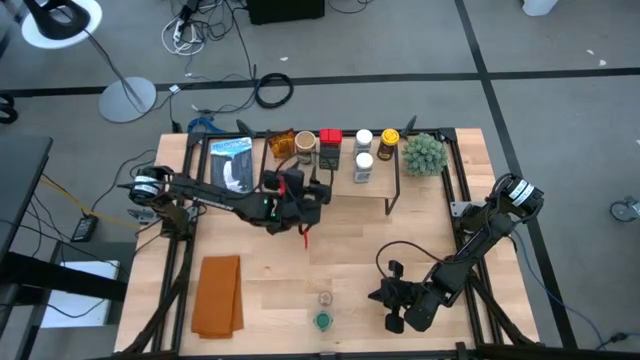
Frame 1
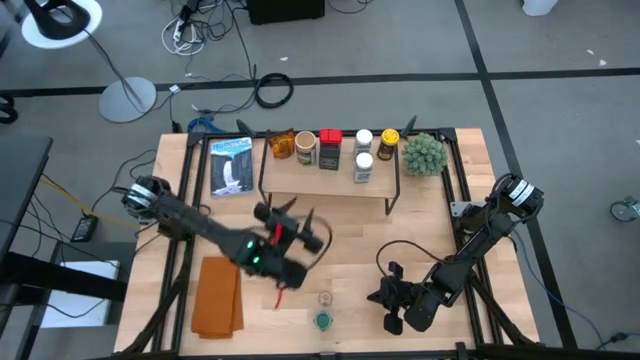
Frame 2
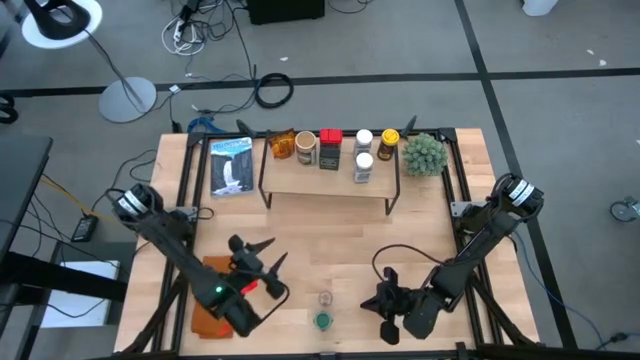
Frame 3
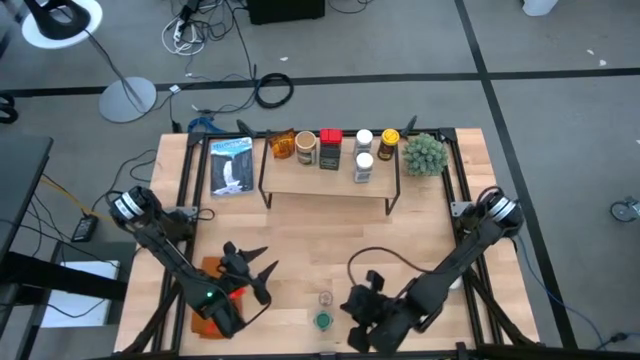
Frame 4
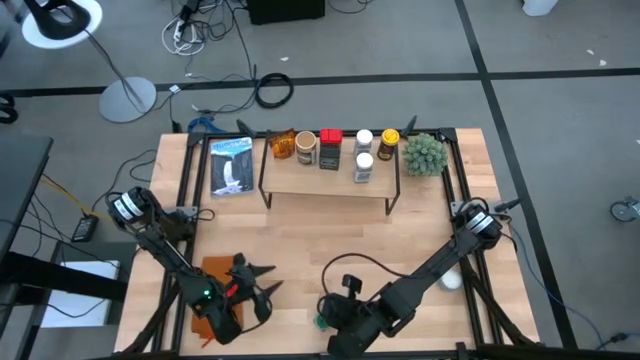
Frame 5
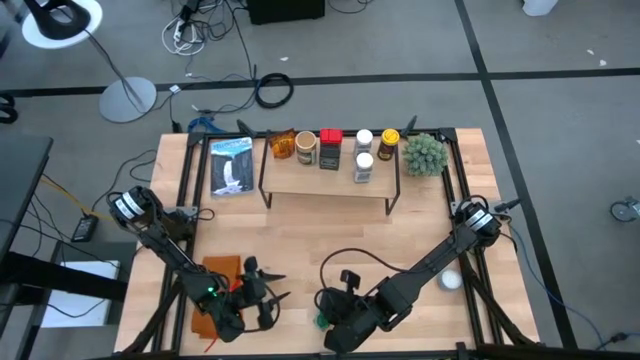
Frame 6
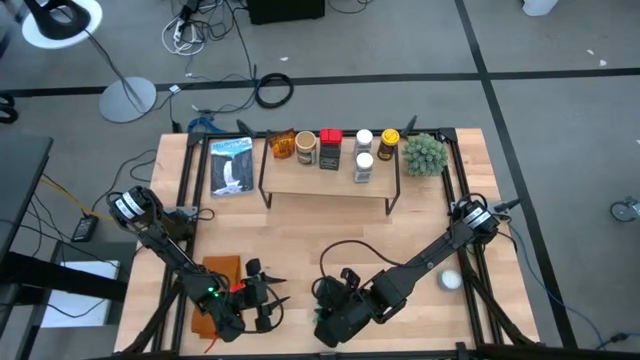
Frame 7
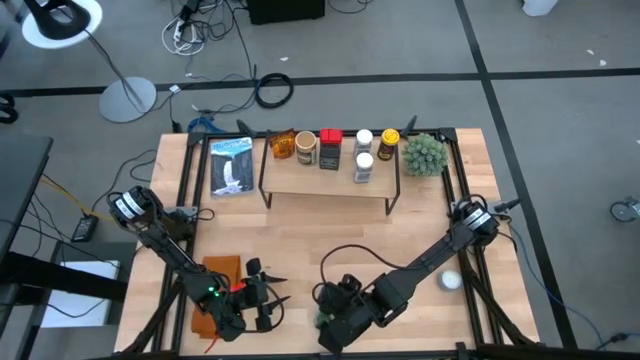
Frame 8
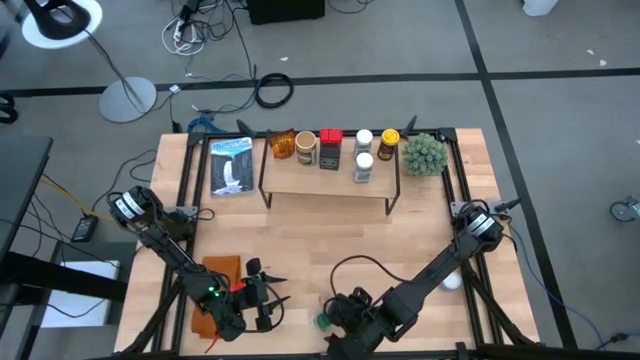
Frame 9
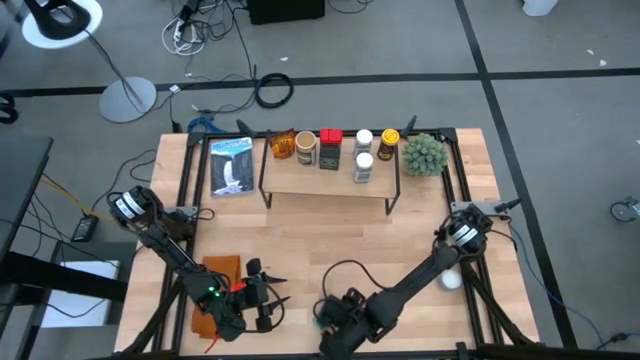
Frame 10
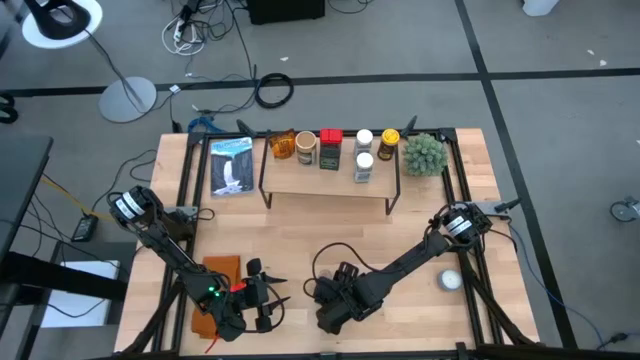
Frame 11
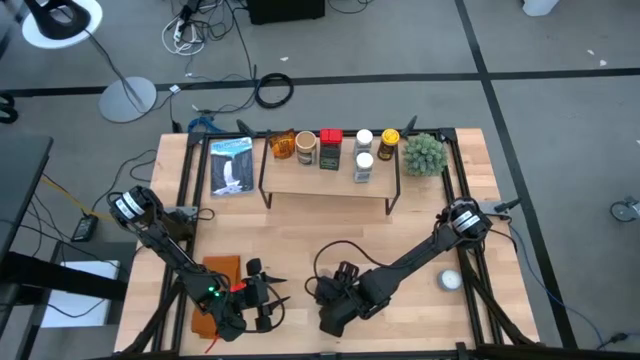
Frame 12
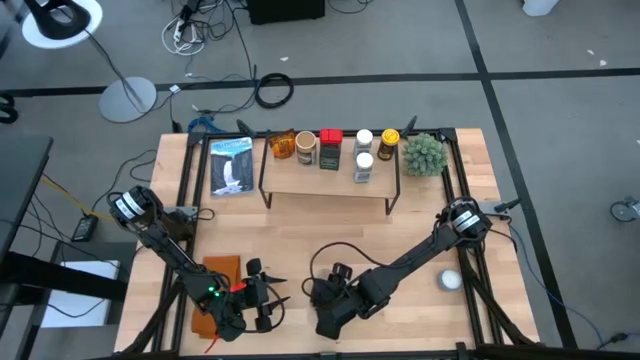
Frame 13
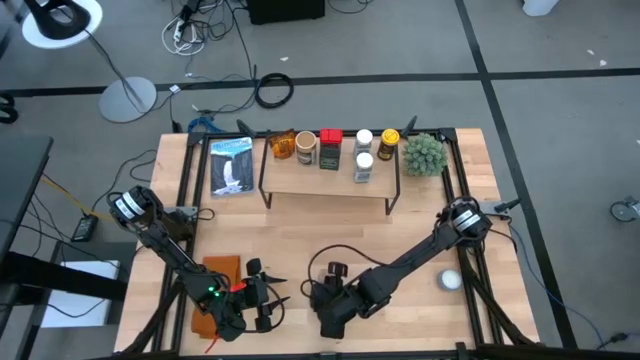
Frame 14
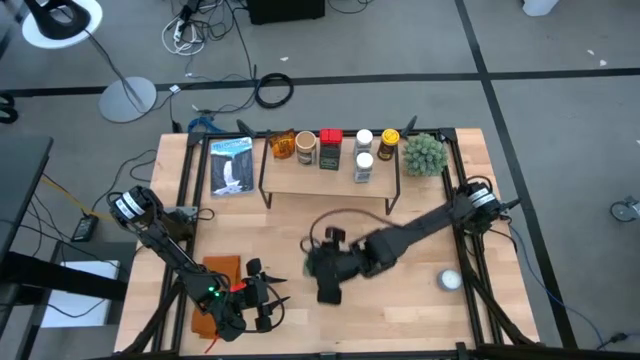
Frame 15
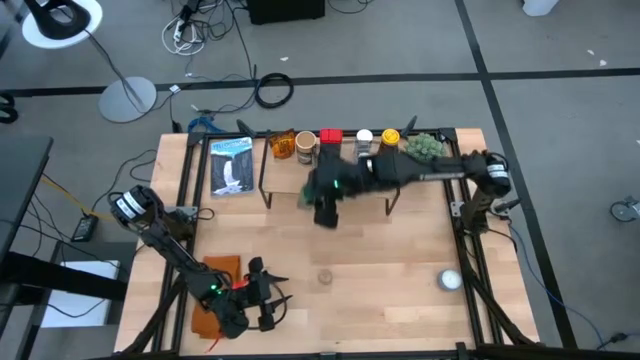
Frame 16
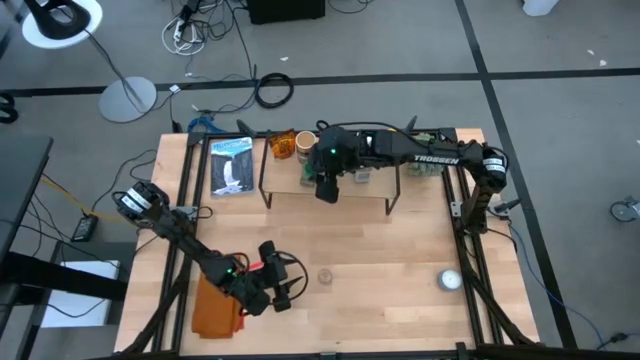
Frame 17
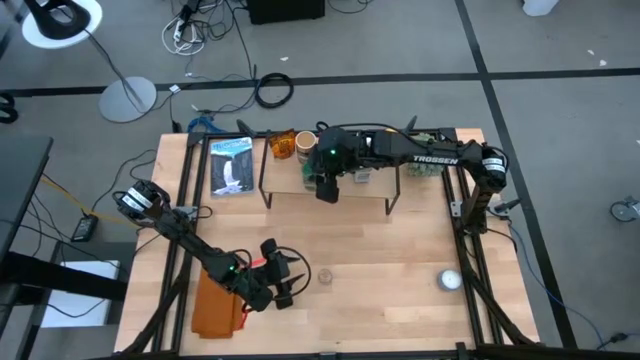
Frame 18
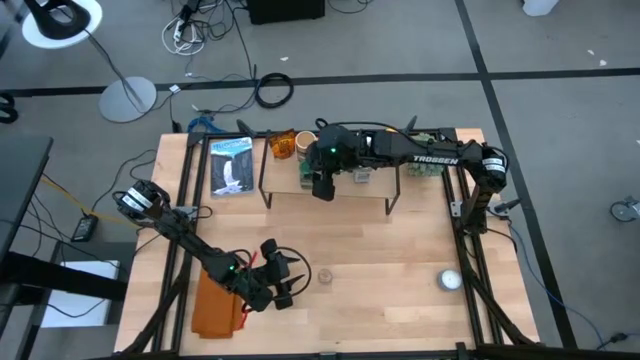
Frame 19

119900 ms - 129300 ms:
Task: Shelf spices
Put the green seasoning bottle on the shelf

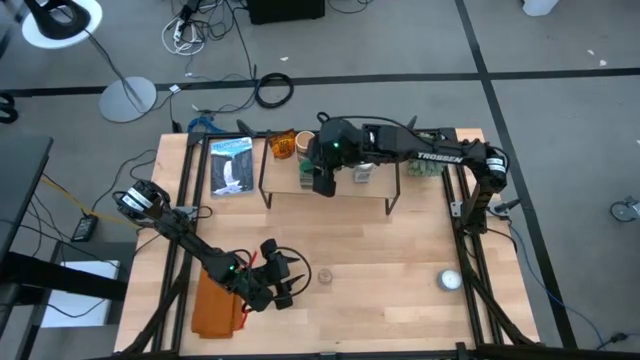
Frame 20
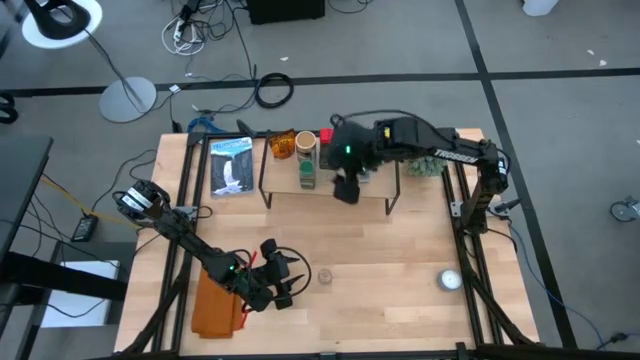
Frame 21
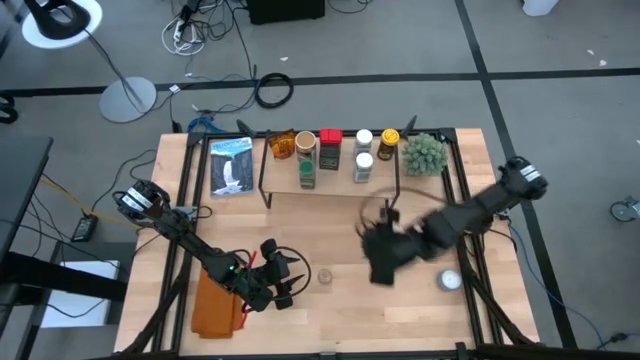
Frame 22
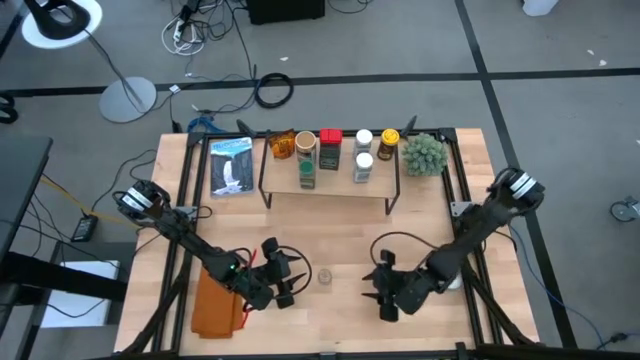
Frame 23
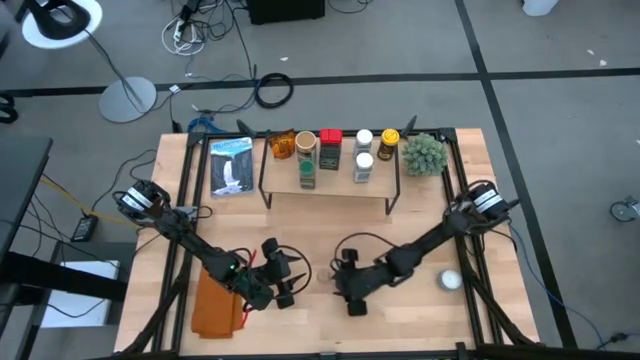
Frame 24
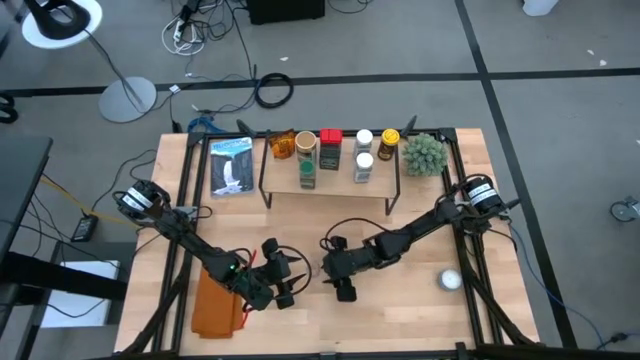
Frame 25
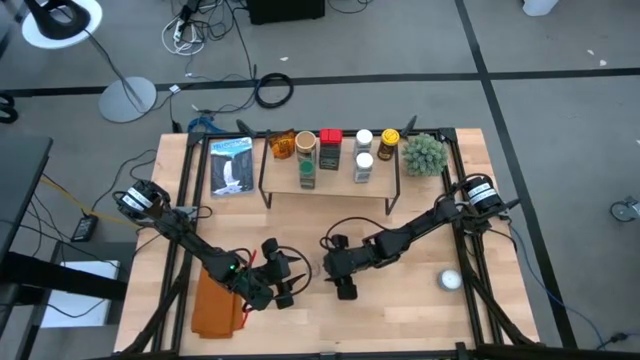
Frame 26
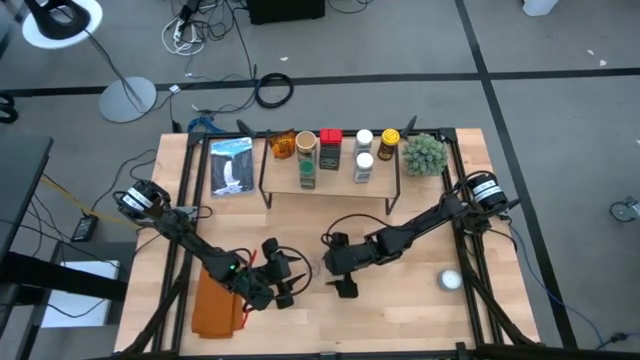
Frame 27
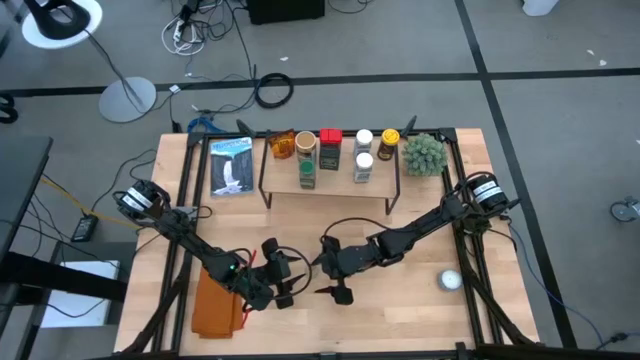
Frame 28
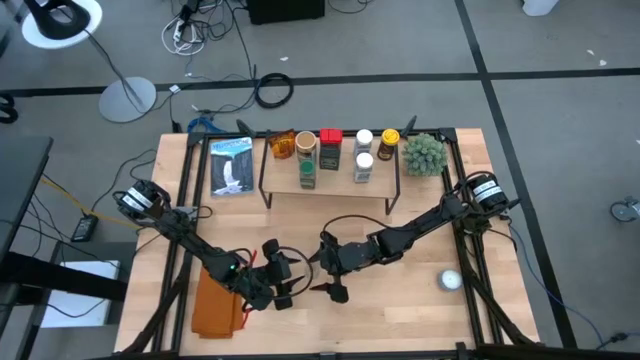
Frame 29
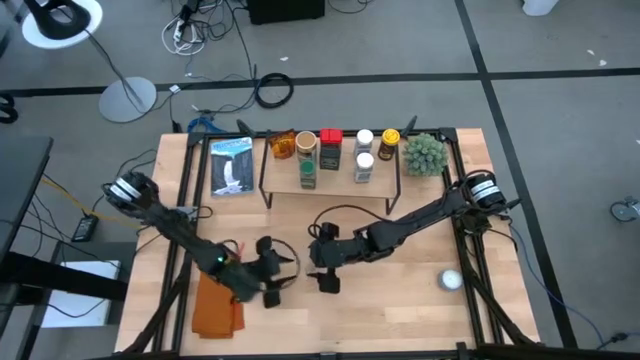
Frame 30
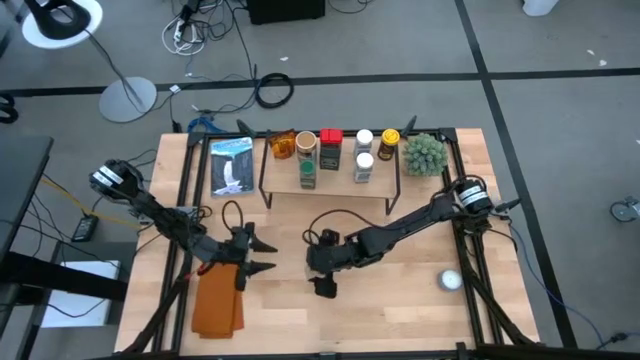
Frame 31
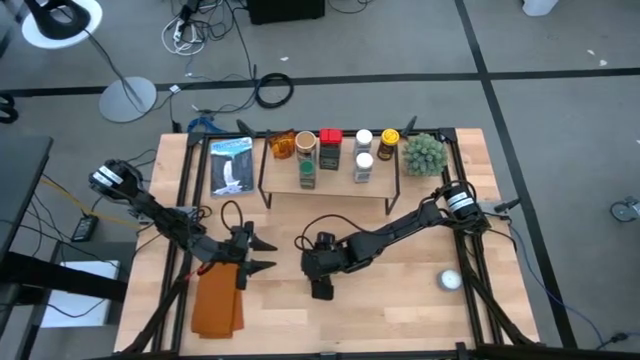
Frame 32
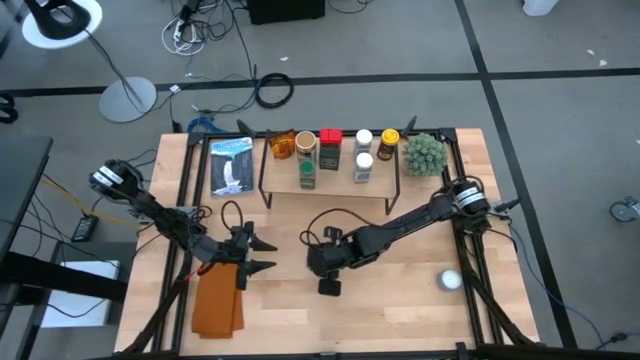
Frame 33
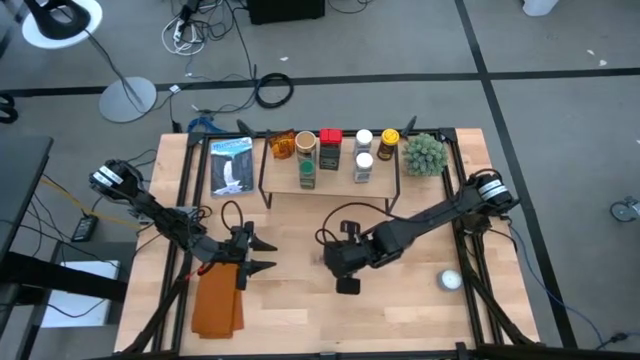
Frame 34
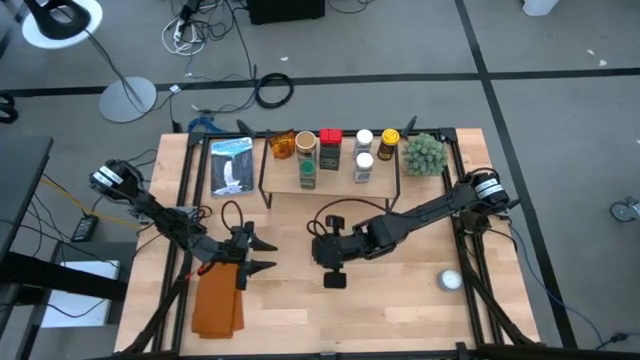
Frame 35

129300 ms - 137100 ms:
Put the brown seasoning bottle on the shelf

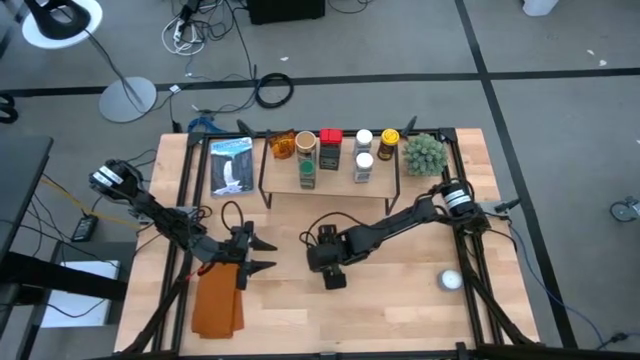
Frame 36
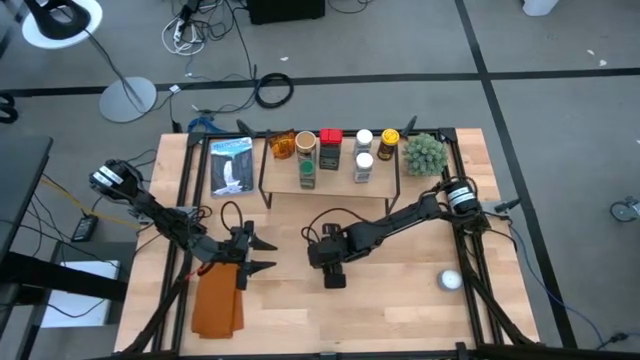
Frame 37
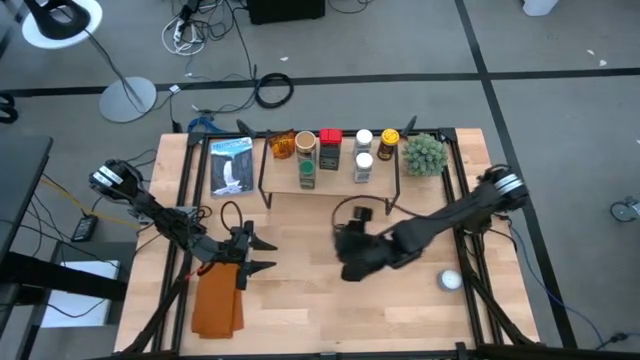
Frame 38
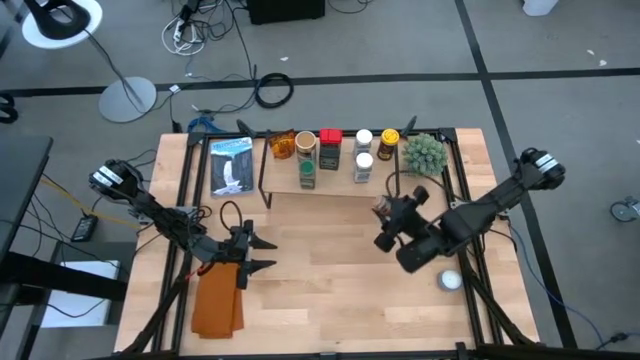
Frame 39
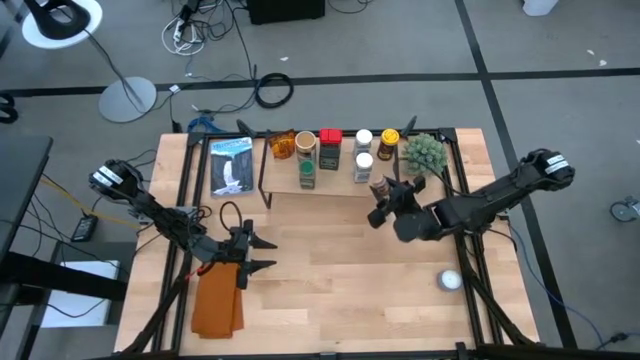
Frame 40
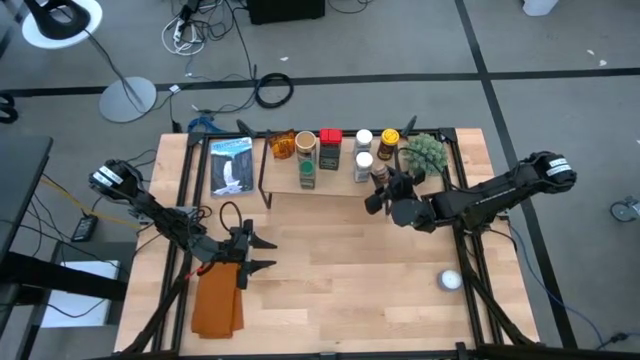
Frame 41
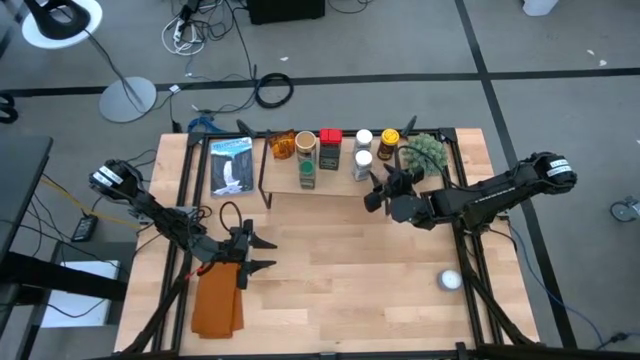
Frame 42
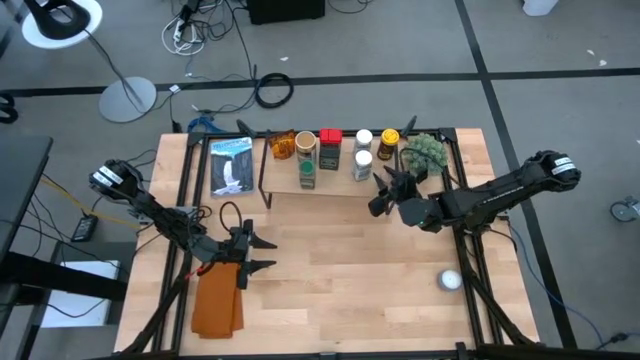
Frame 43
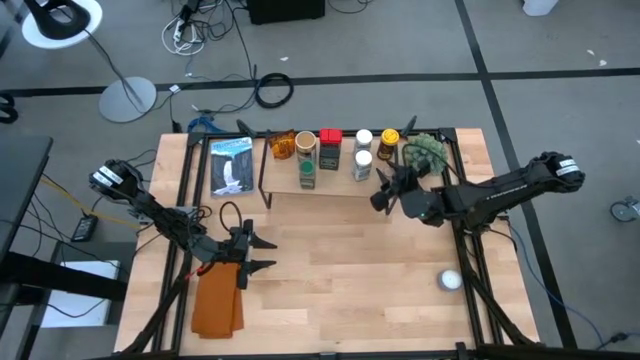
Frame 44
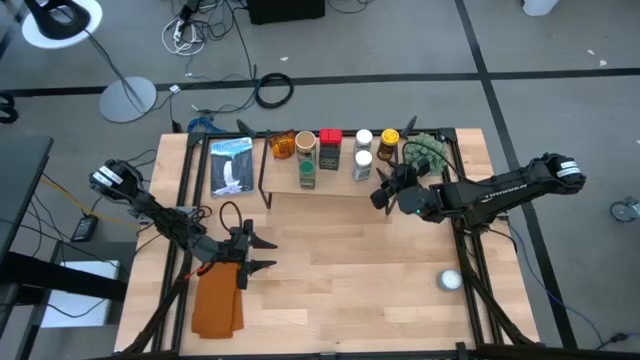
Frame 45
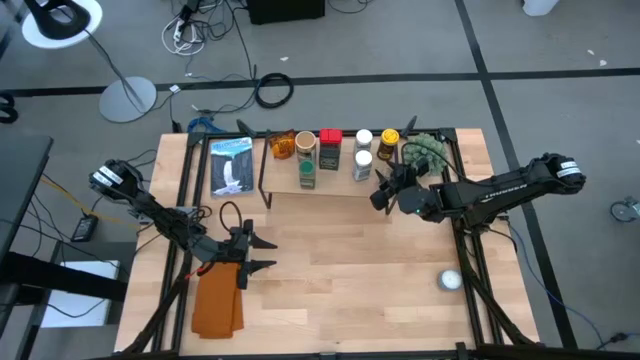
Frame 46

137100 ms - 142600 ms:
Put the brown seasoning bottle on the shelf
